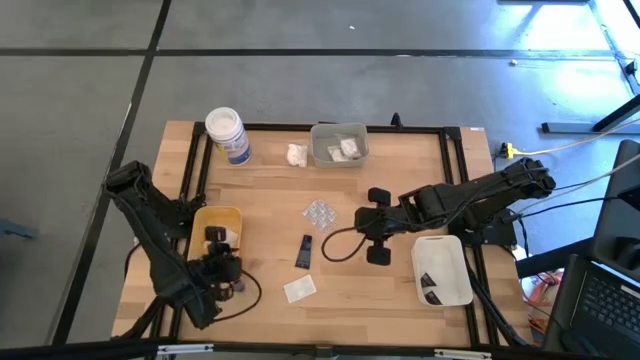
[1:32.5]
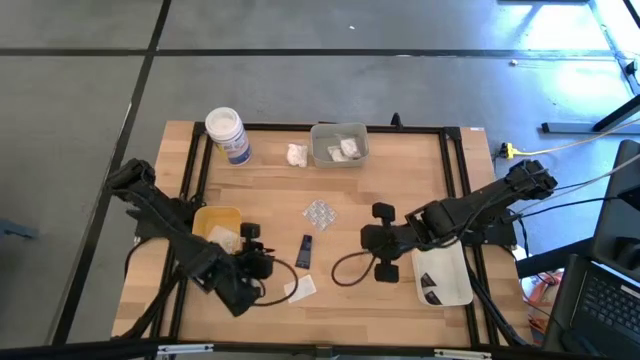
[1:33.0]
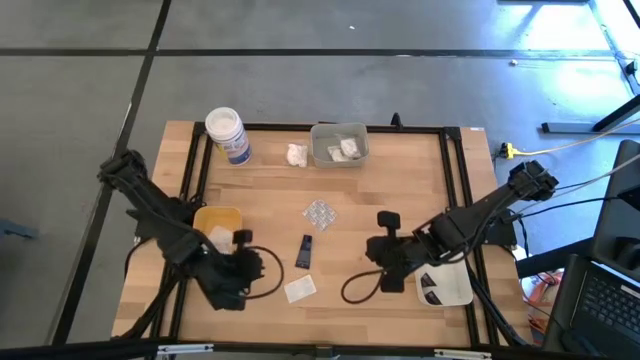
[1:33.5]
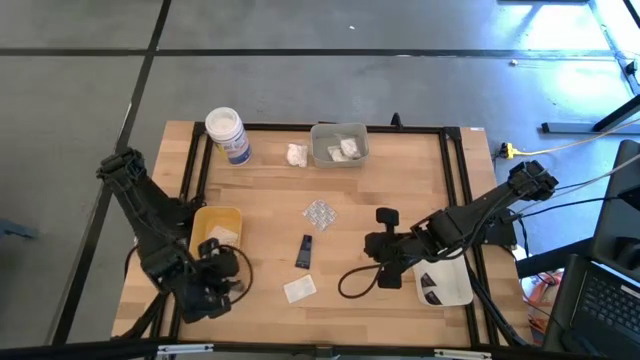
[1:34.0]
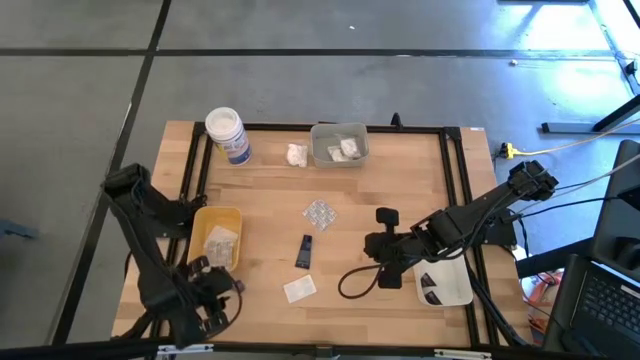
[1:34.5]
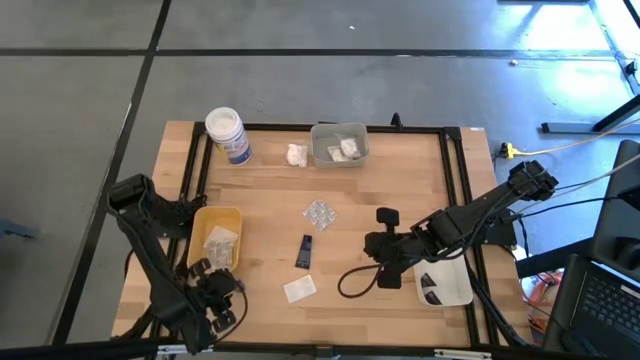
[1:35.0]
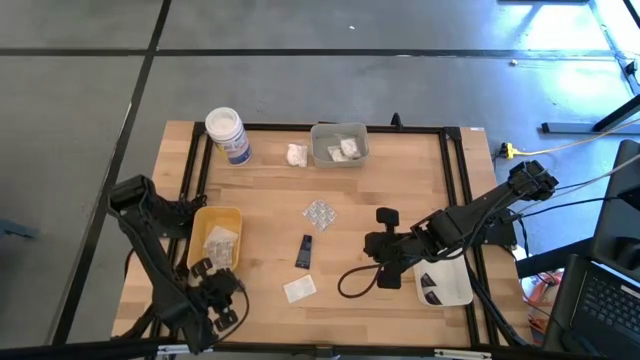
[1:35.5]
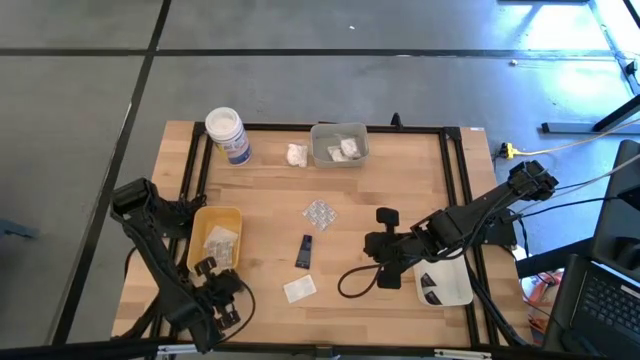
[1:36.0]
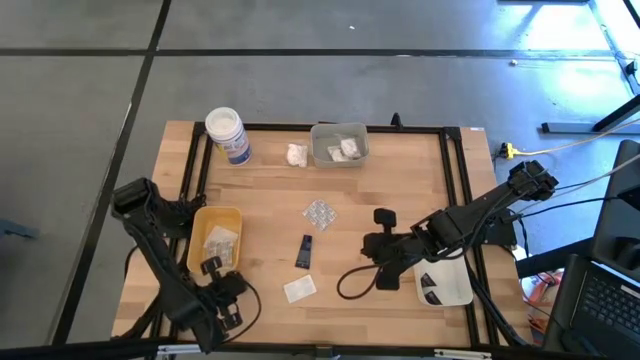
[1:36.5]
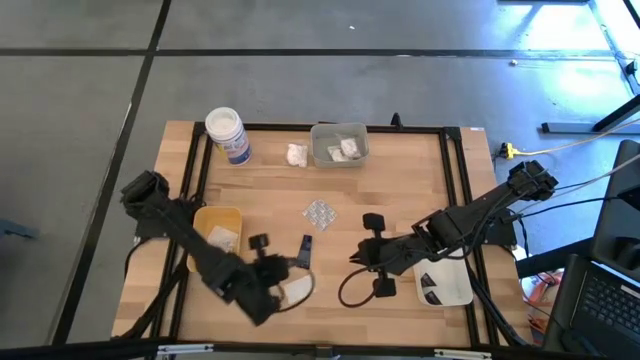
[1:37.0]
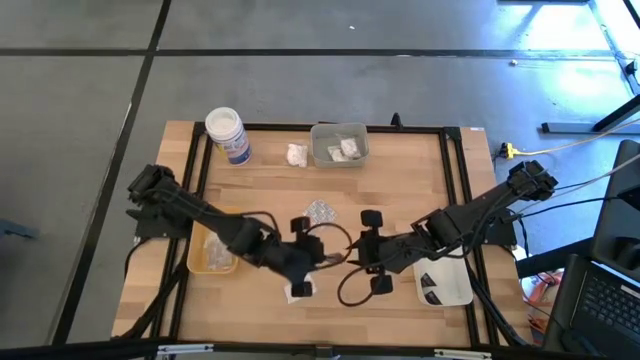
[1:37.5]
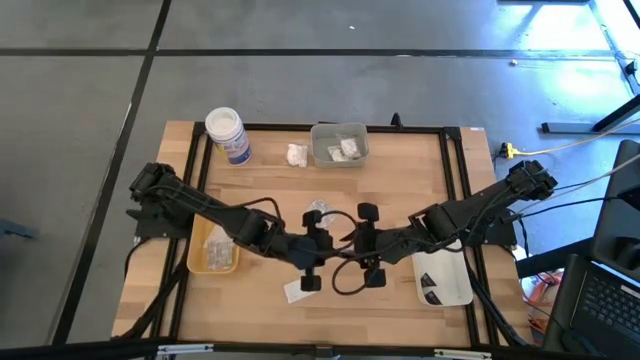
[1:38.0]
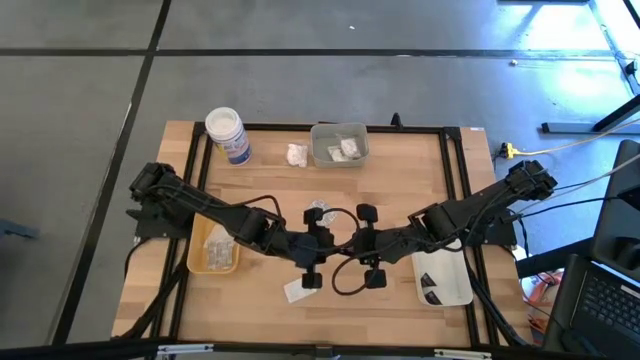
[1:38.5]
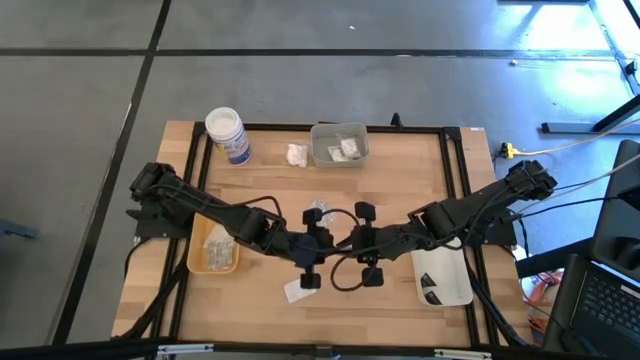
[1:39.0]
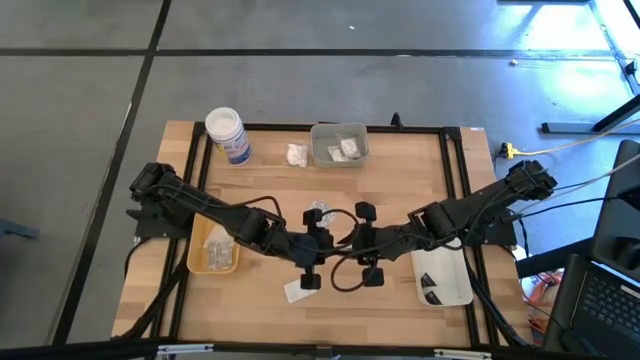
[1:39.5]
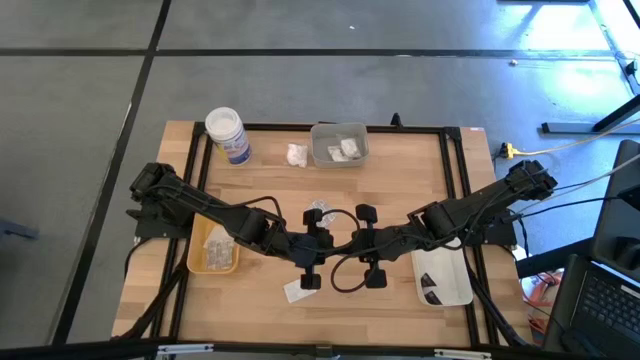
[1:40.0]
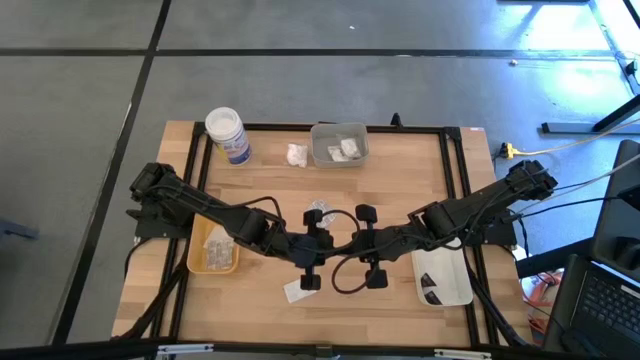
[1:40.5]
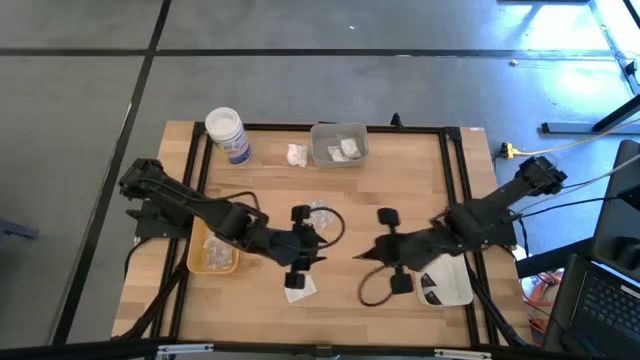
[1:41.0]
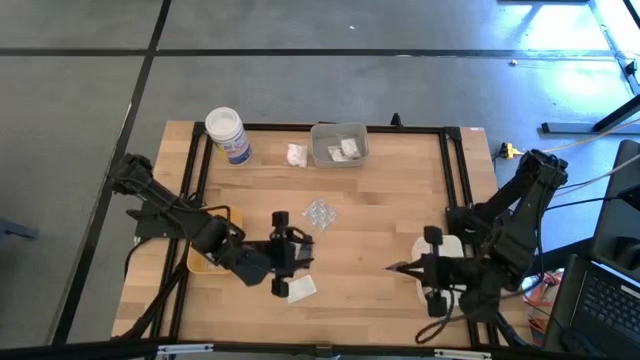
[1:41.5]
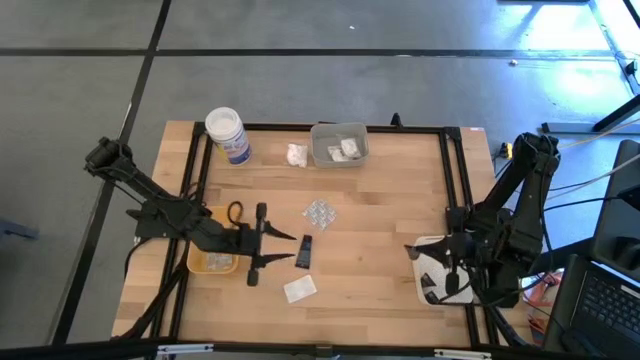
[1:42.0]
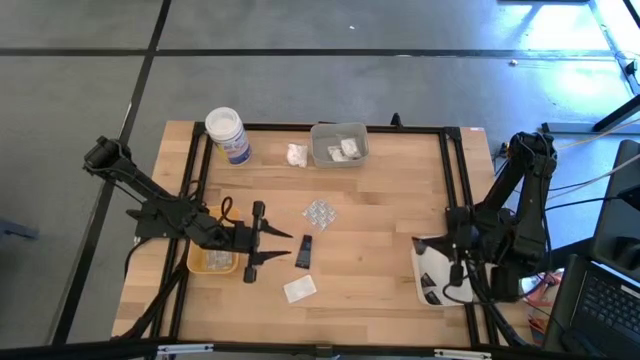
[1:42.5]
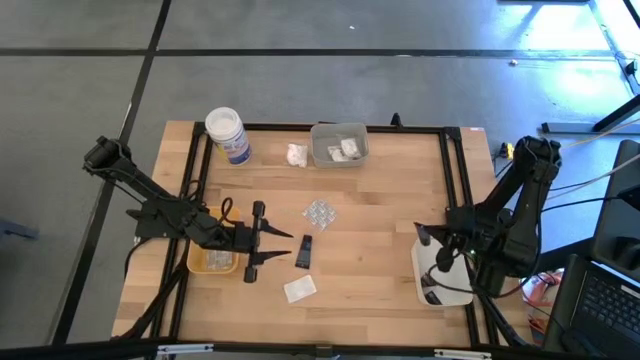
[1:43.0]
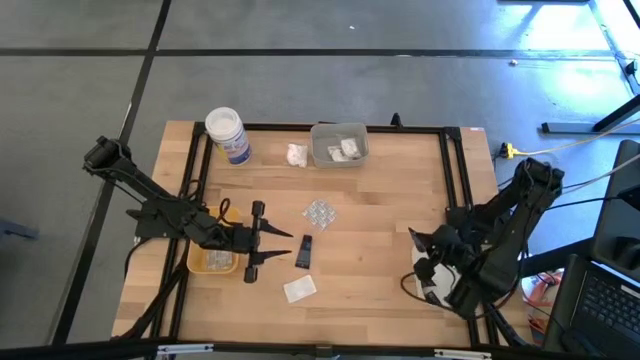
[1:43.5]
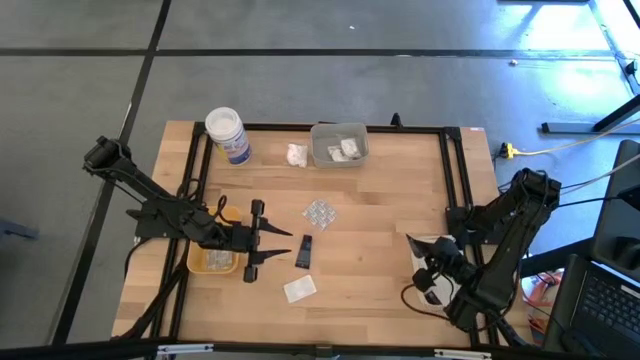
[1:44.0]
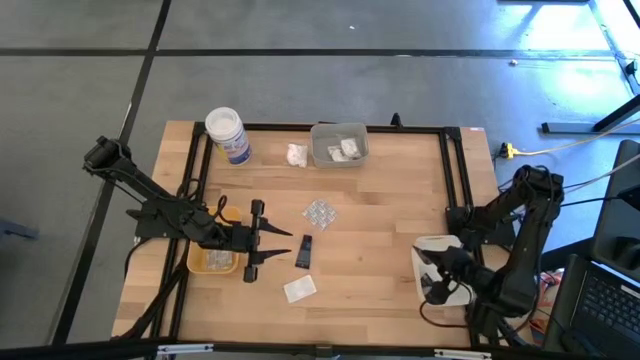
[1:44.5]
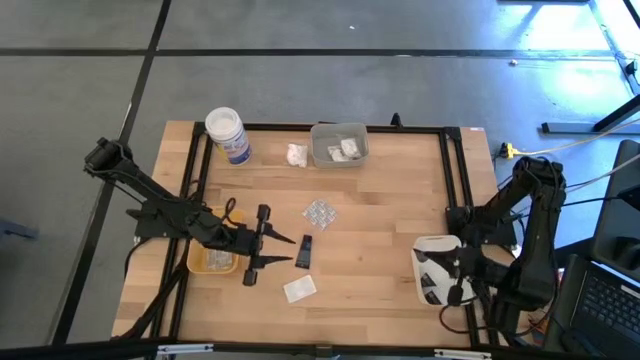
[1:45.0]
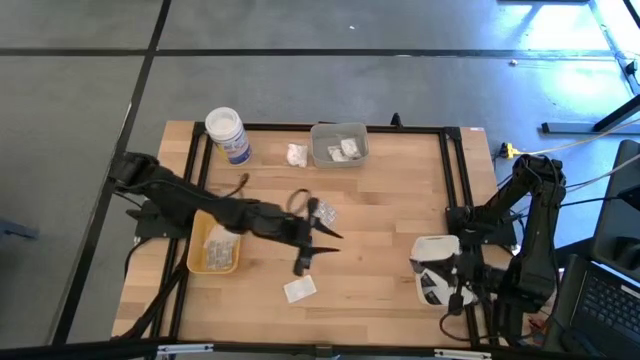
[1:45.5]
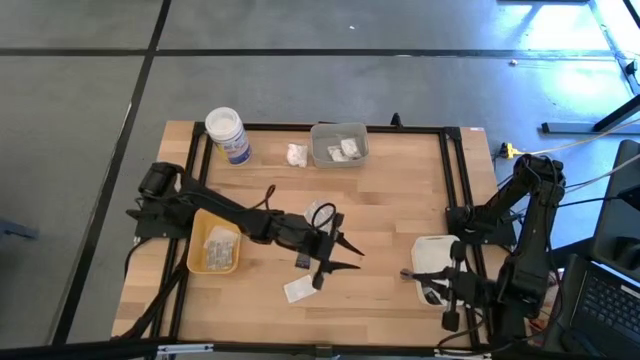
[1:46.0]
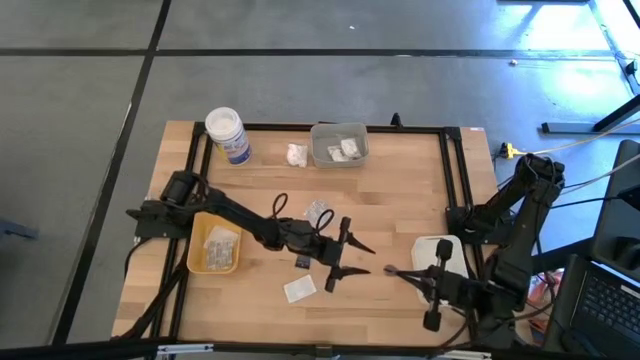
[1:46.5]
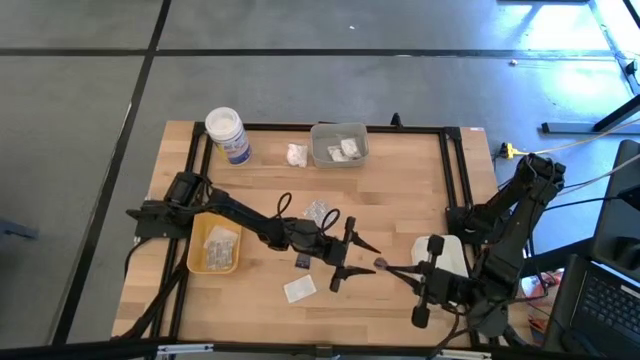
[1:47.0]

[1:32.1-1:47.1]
Task: Pick & Place Travel size toiletries
Put the blue shaving cream into the white bin

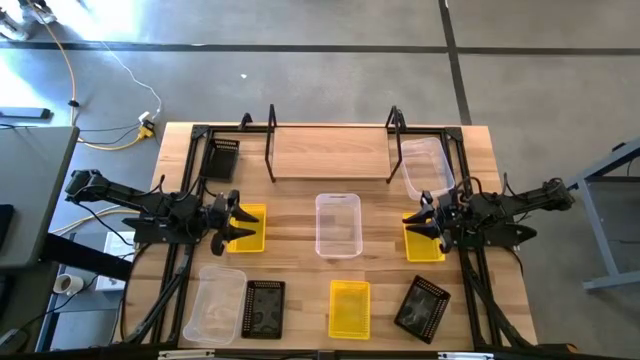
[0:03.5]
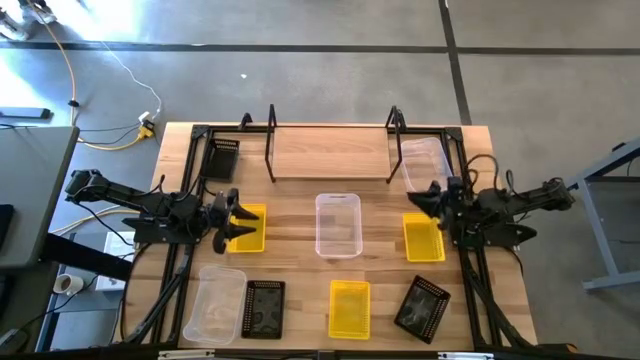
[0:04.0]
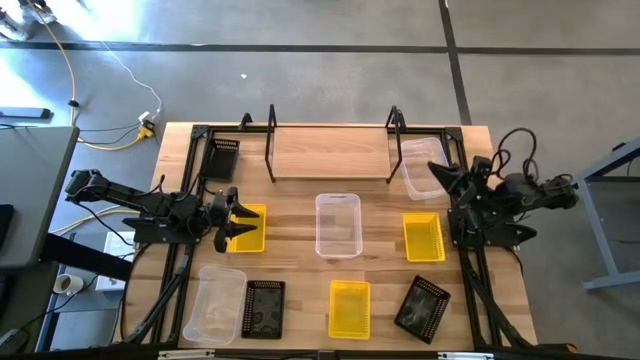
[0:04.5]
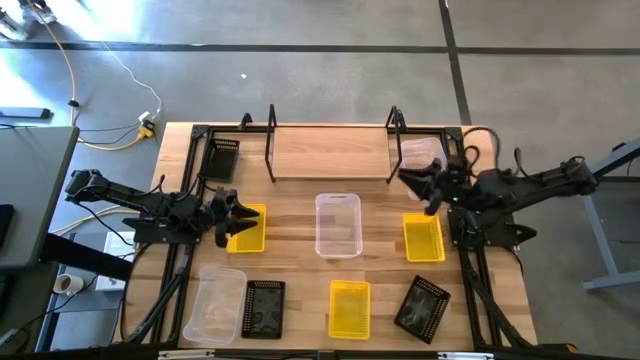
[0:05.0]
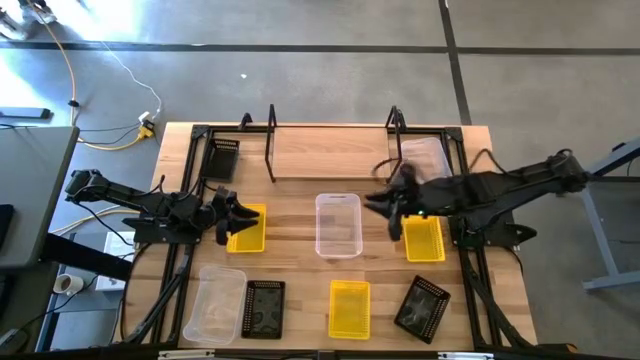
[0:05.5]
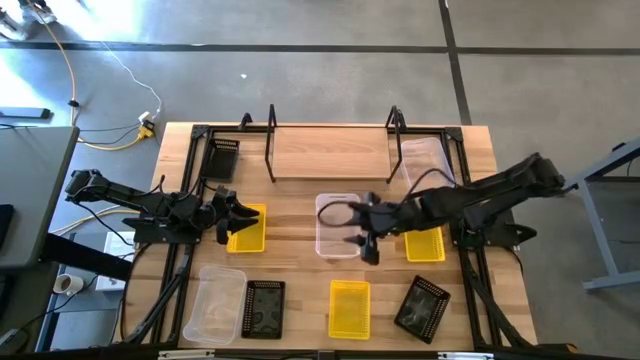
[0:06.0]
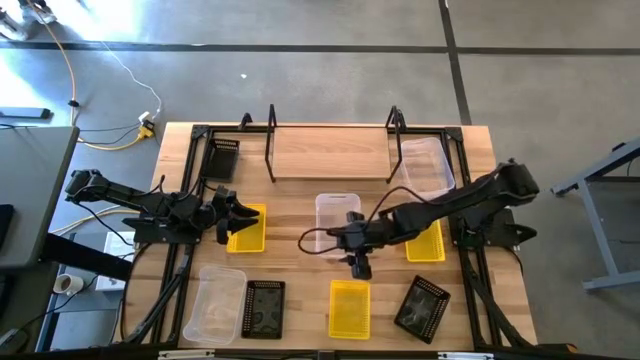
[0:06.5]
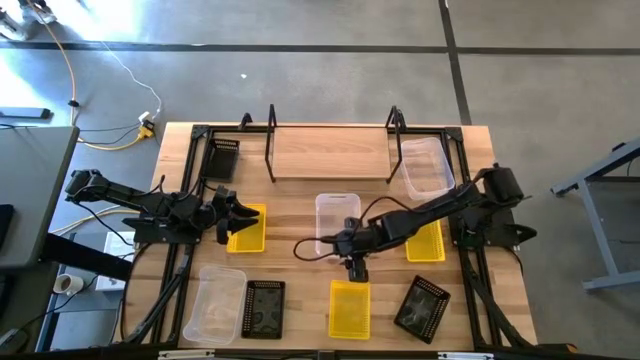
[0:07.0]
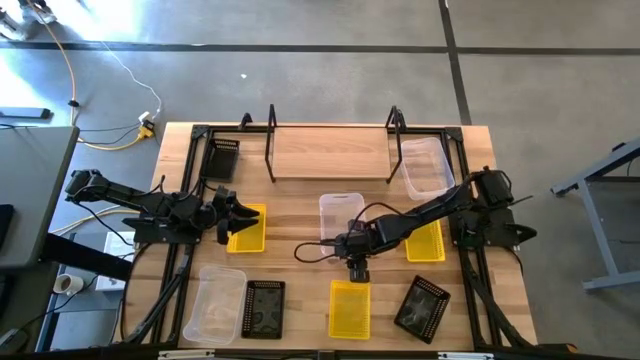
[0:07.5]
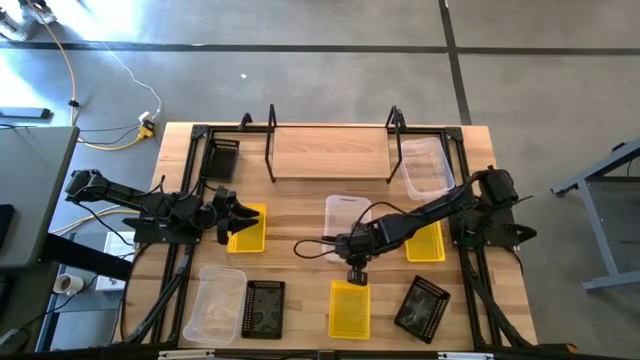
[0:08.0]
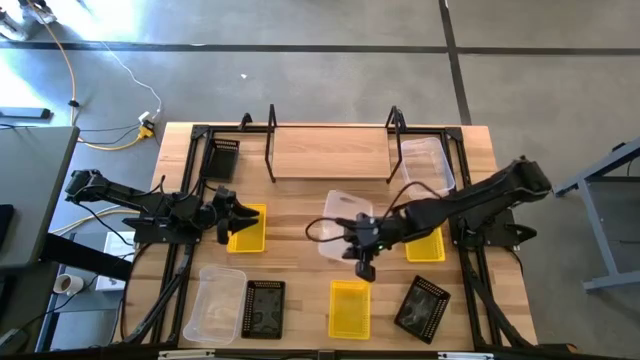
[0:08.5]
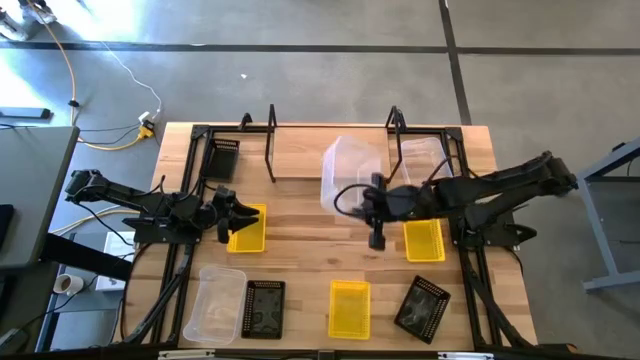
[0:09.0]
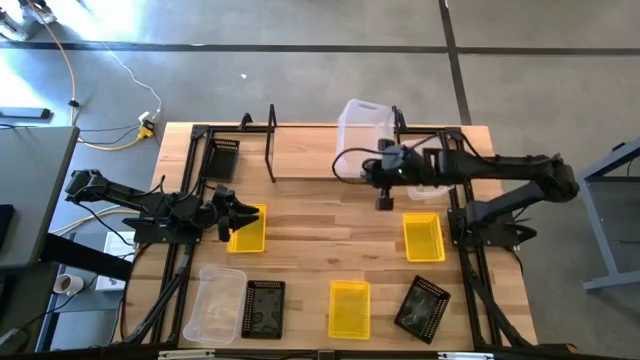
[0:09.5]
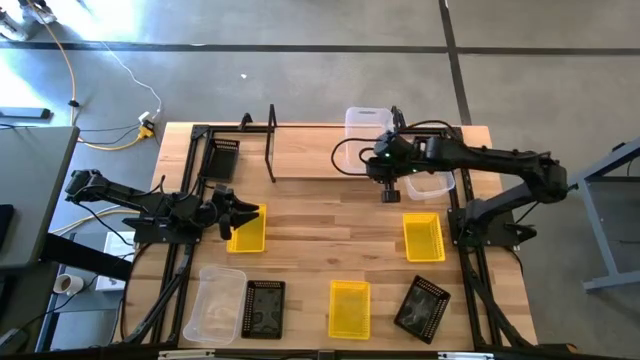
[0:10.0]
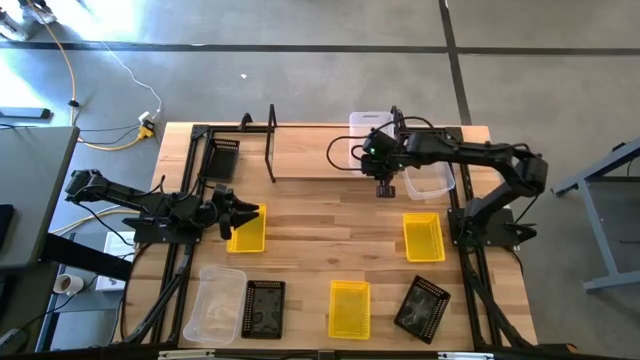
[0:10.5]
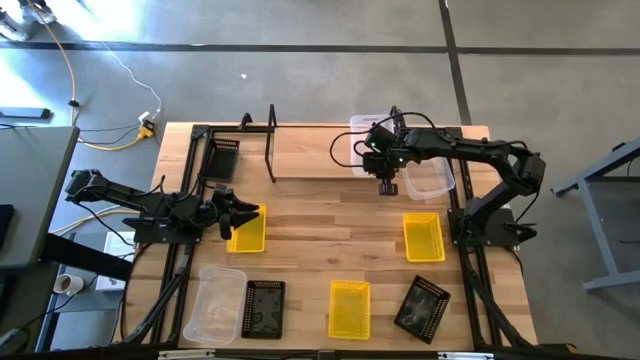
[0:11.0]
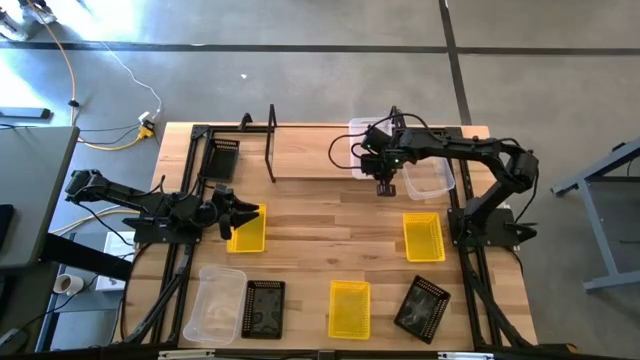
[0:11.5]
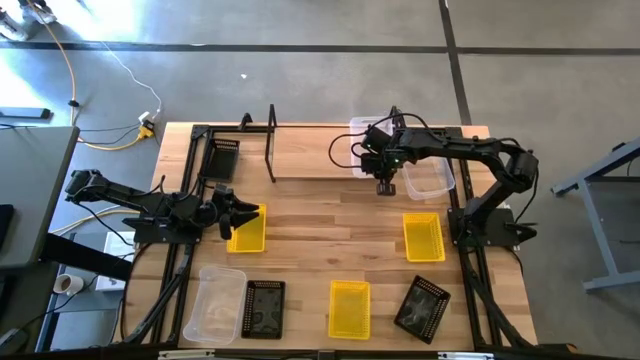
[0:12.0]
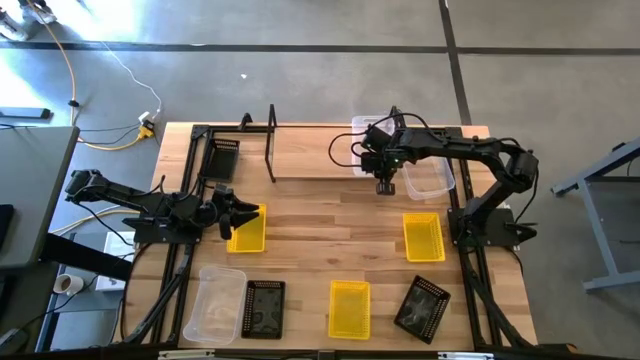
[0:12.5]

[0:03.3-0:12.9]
Task: Stack baskets on shelf by color
Put the middle transparent bin on the shelf
